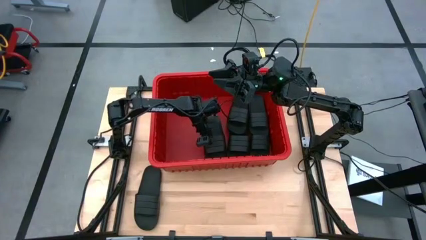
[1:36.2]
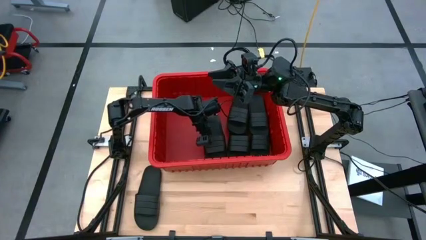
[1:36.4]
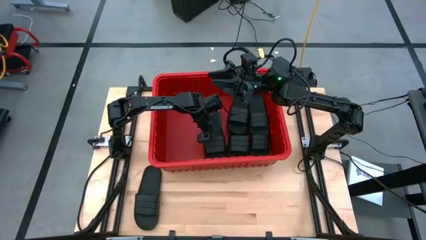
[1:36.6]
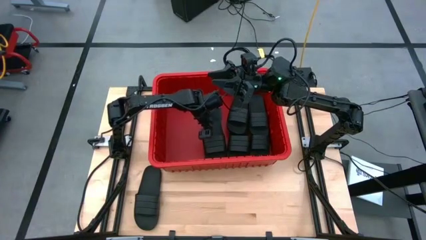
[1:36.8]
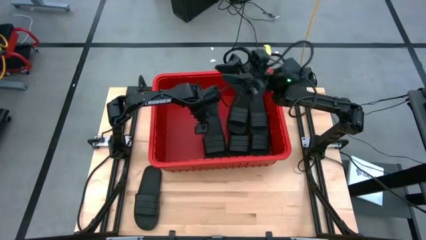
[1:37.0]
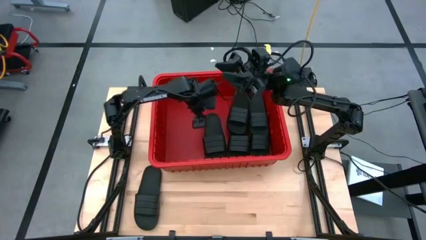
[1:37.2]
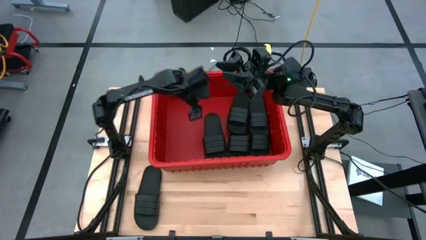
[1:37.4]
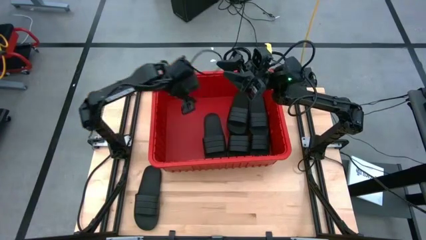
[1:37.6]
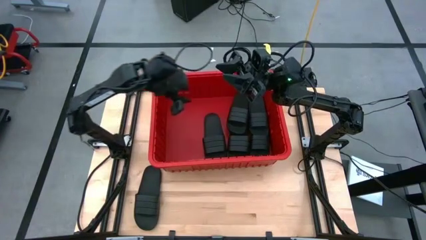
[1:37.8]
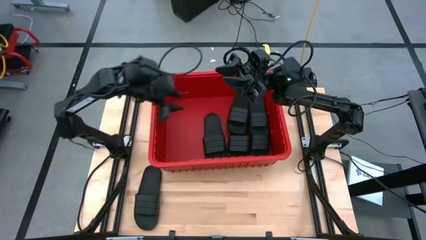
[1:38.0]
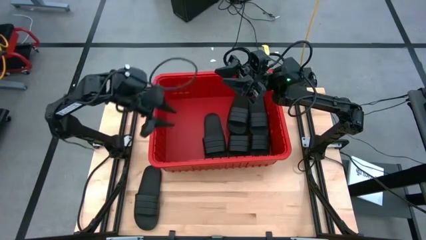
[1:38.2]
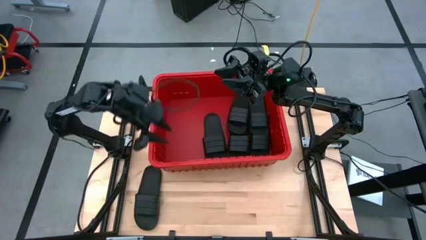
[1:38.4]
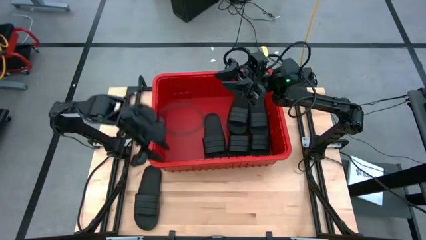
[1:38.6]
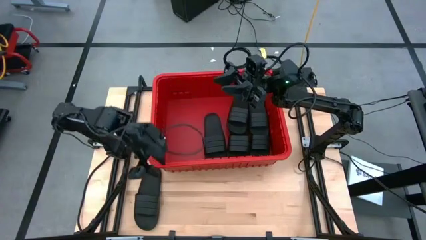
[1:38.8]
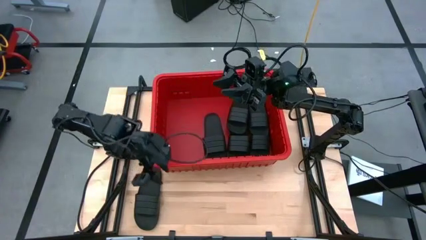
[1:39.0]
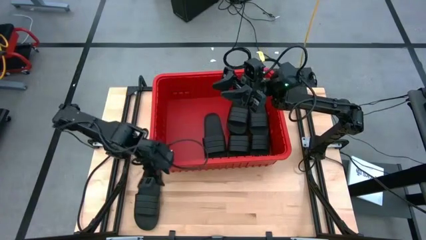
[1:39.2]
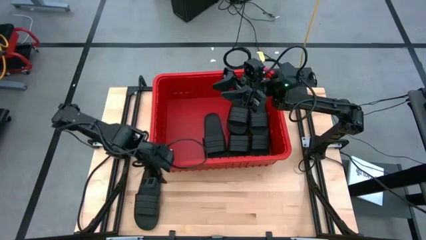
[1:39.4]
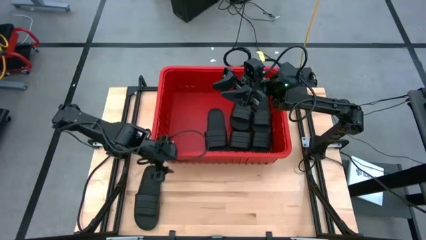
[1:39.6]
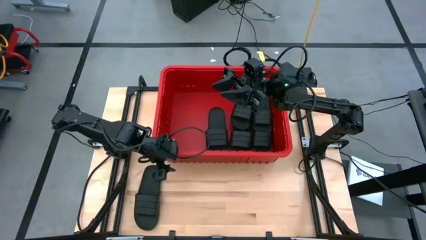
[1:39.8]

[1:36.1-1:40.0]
Task: Pick and place slides into bin
Adjust the red bin

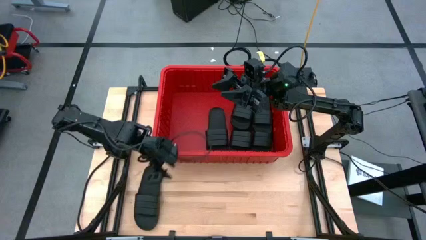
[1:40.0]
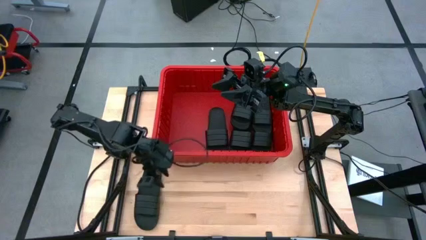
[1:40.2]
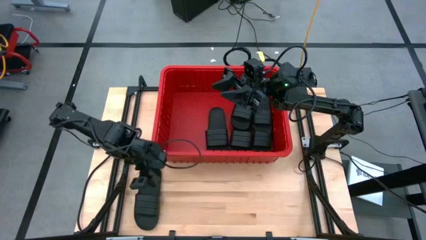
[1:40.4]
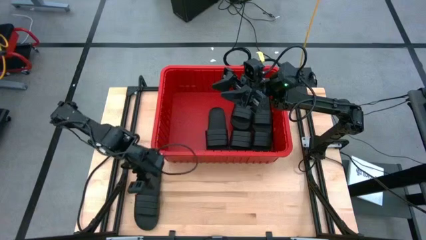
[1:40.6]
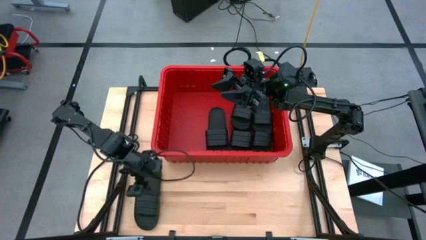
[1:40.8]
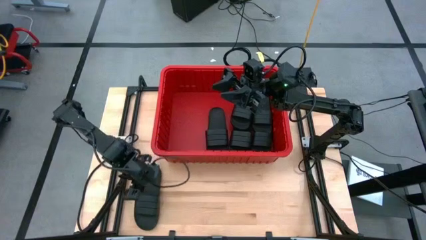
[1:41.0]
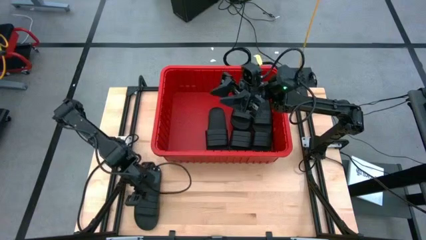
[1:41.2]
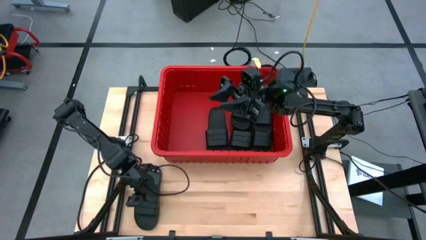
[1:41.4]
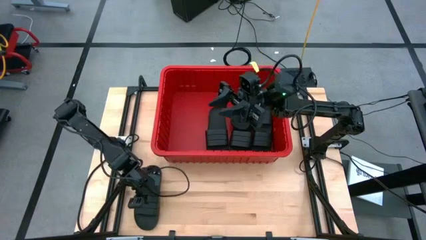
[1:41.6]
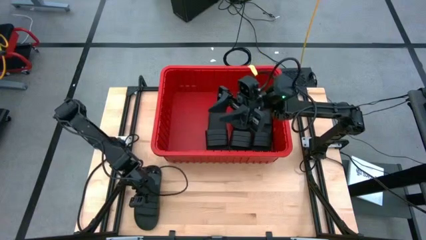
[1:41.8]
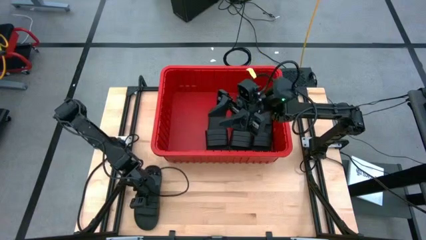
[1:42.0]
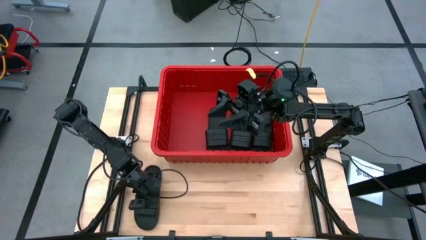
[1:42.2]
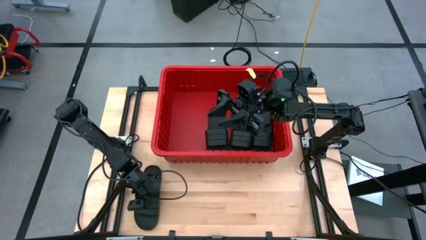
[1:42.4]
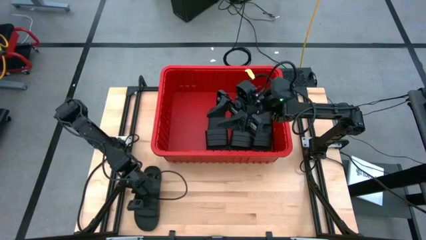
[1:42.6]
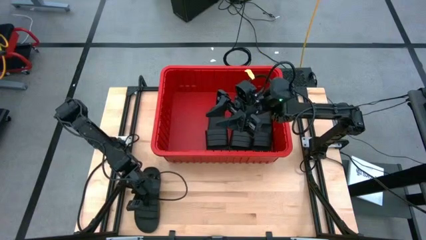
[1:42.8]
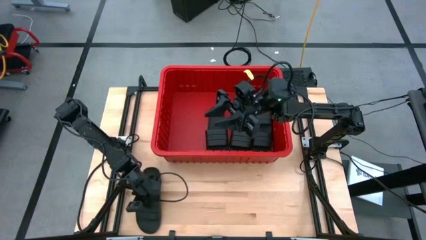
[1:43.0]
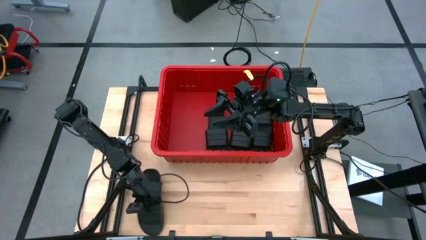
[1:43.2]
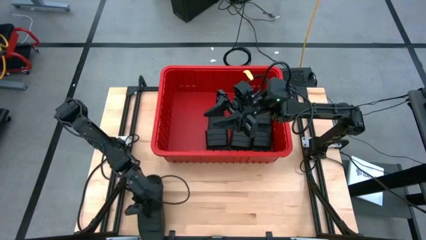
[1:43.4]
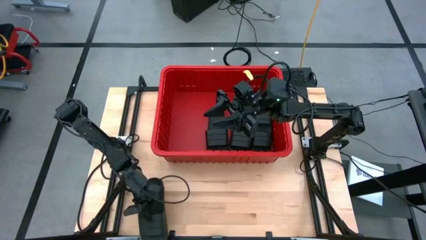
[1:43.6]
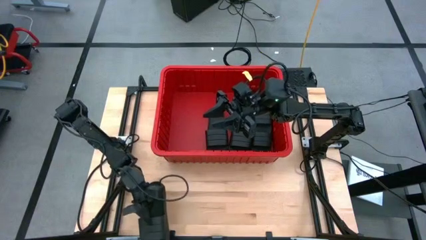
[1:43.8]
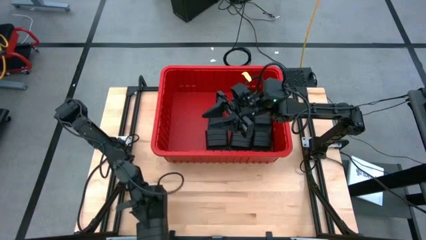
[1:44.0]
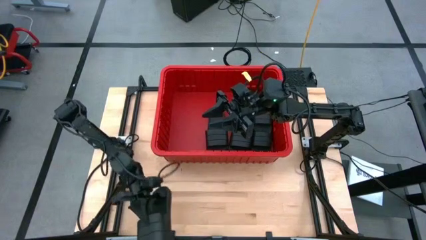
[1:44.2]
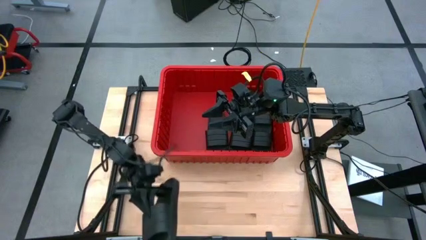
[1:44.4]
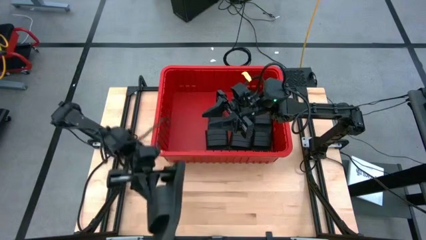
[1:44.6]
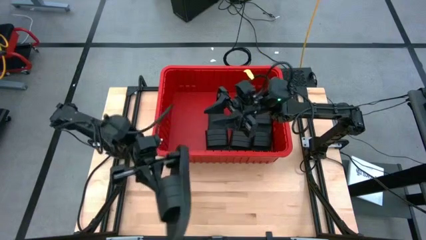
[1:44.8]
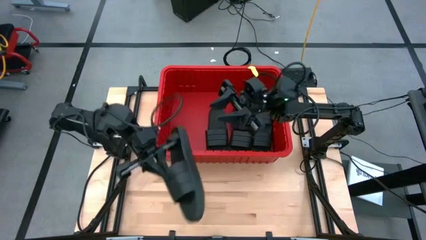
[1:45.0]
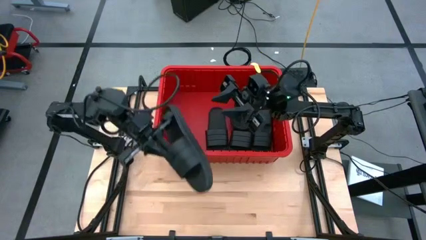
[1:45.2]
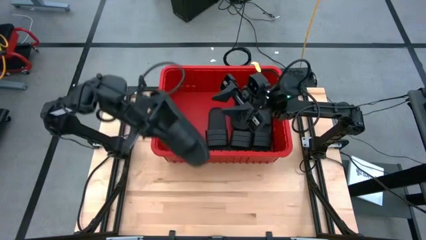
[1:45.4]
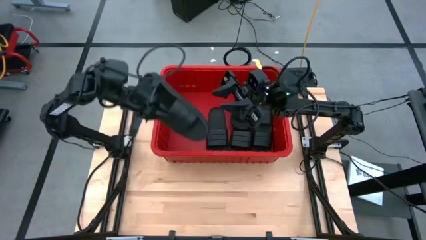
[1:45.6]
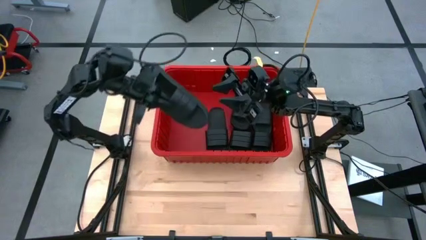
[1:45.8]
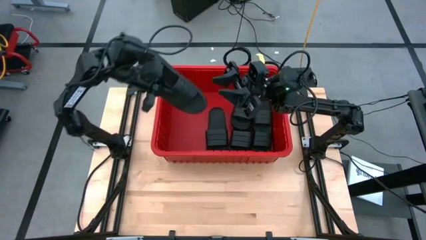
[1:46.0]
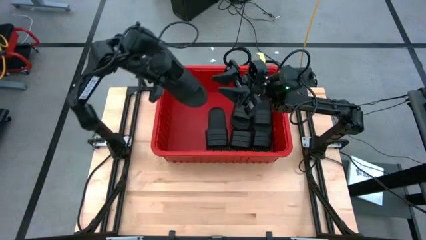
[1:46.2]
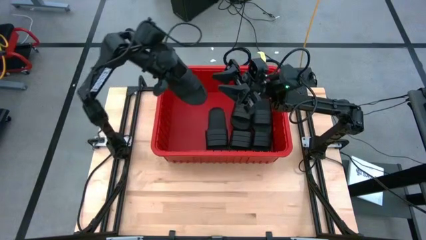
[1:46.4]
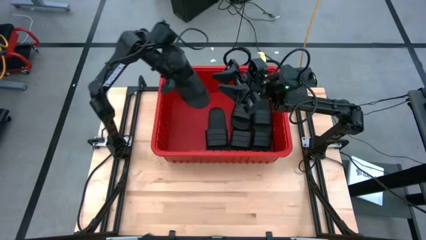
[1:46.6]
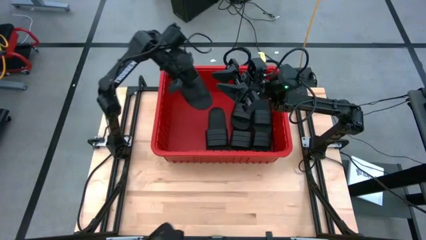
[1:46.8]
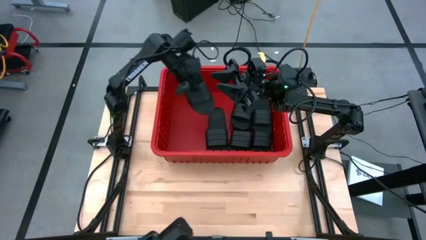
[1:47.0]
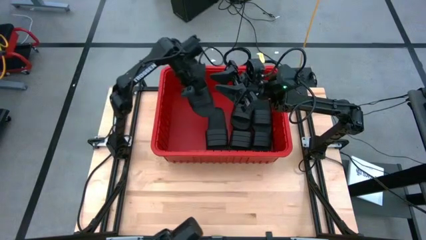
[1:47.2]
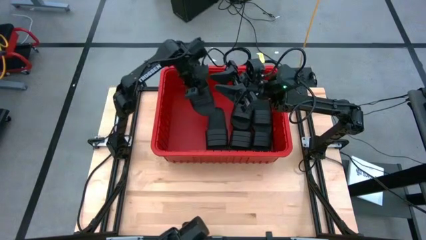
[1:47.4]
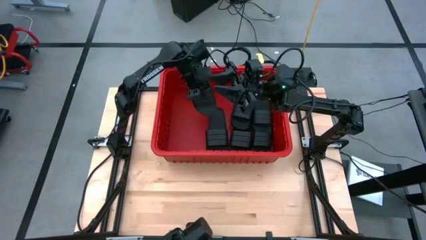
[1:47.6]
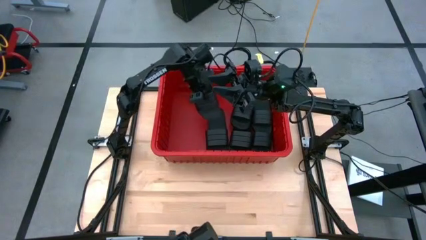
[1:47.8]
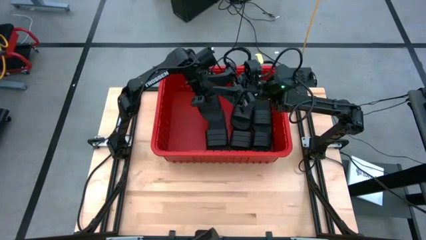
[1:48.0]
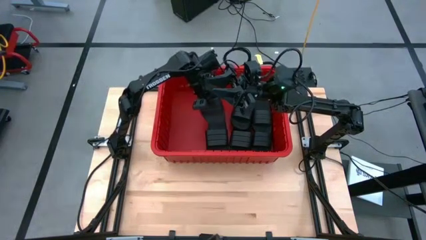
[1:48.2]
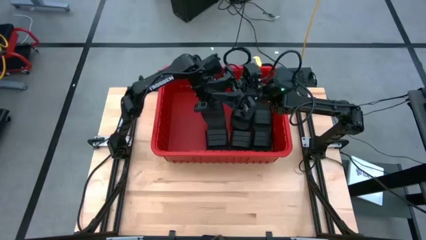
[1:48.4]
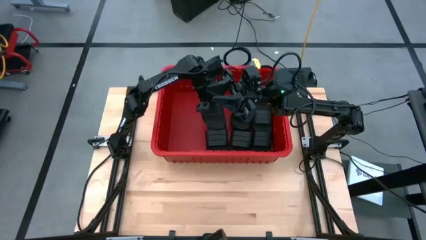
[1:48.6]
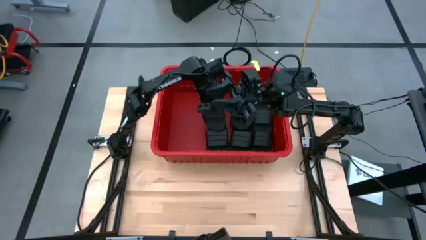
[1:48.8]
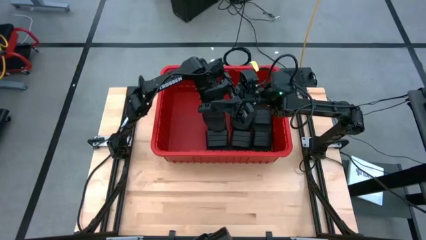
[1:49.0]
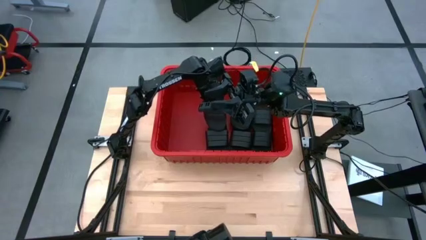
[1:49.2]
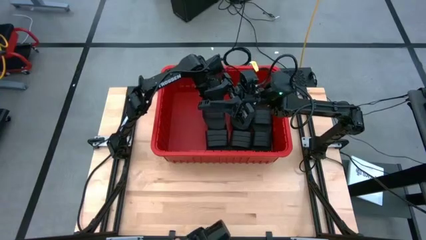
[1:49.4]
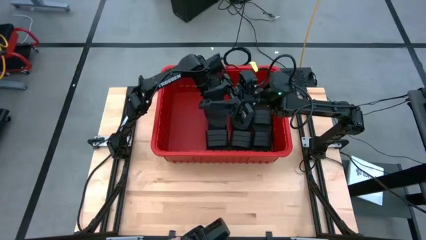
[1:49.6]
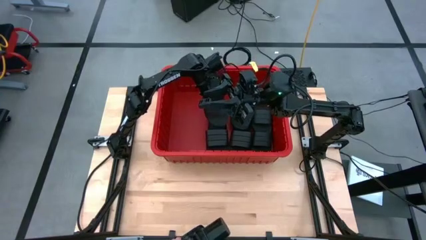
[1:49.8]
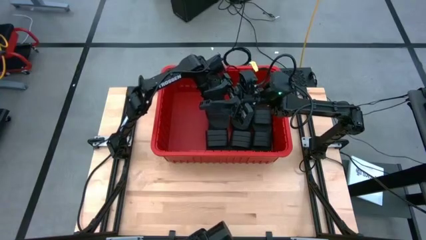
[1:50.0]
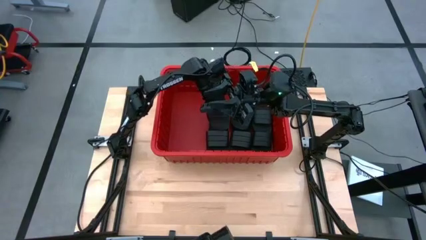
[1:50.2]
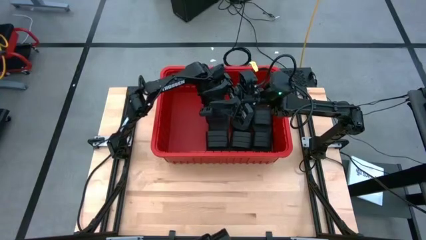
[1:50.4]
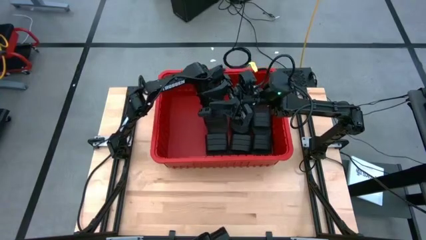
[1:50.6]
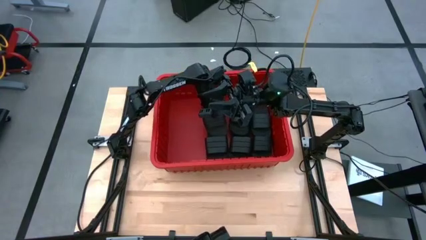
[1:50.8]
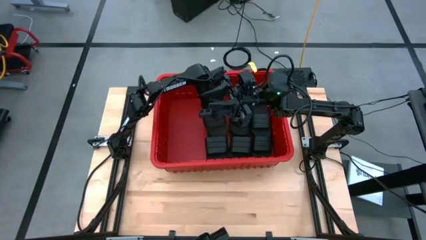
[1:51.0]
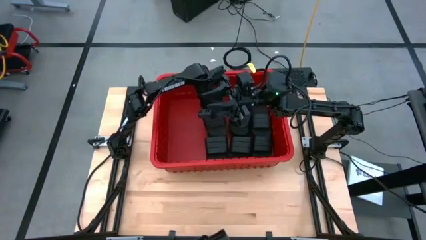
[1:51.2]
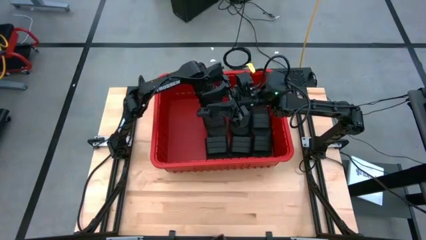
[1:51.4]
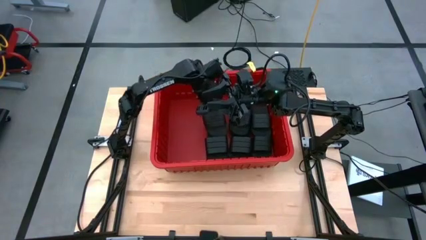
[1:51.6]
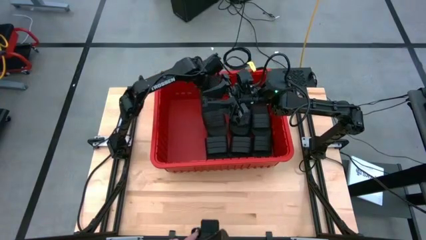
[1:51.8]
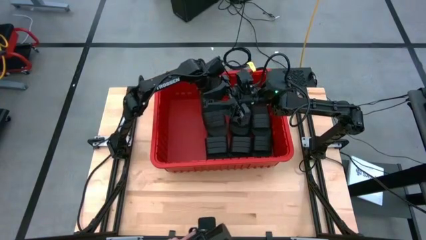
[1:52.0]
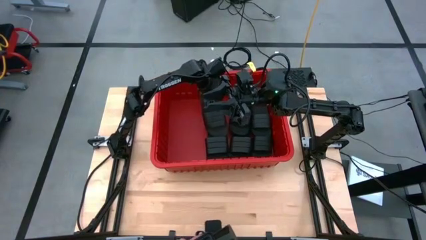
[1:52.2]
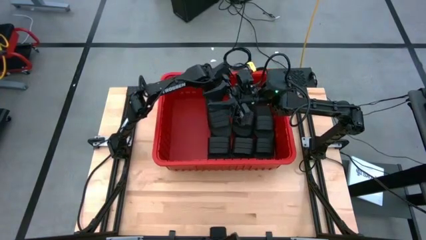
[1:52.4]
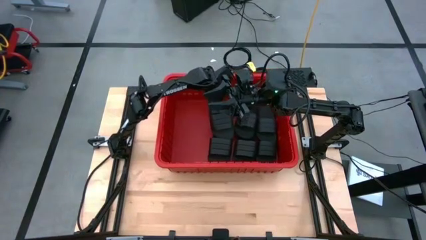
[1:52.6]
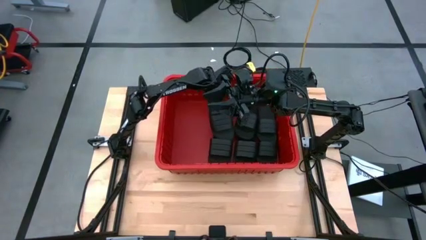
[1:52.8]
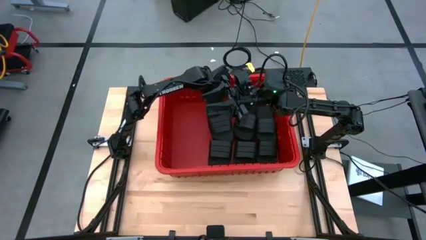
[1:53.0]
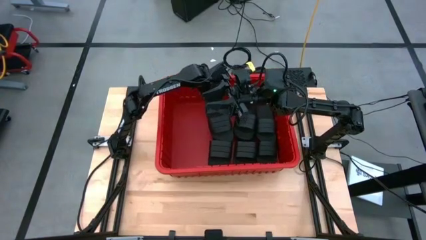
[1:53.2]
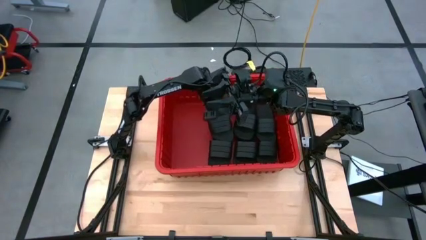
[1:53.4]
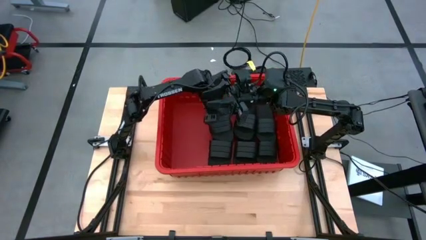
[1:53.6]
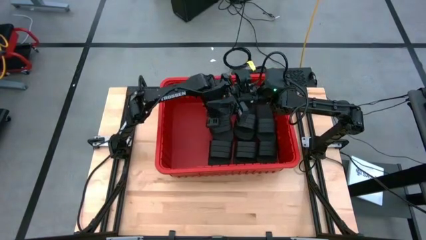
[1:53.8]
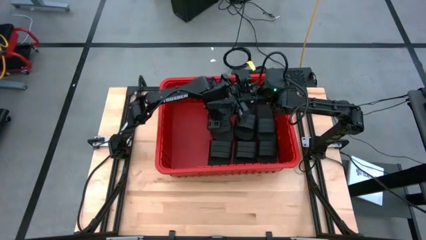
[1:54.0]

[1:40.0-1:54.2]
Put the black slide into the red bin
